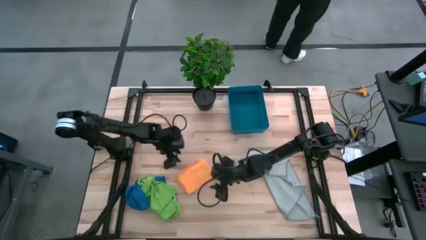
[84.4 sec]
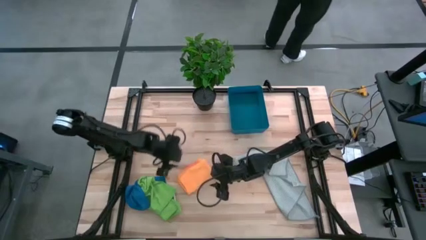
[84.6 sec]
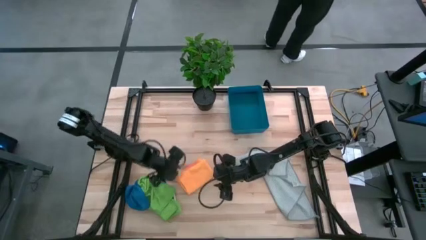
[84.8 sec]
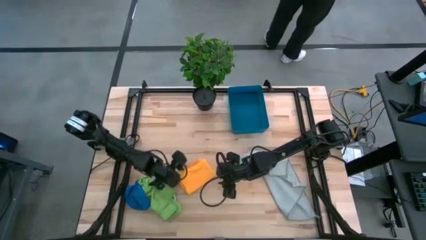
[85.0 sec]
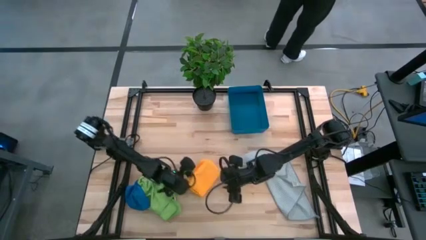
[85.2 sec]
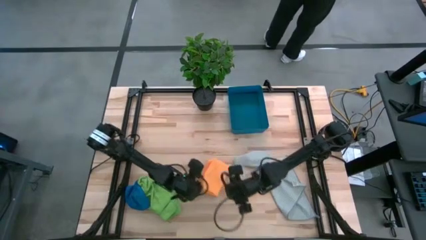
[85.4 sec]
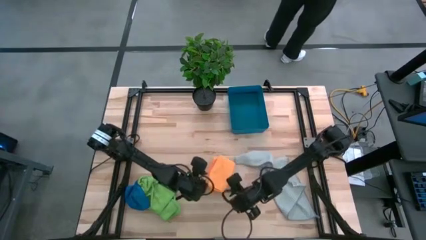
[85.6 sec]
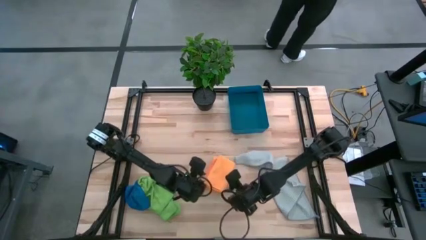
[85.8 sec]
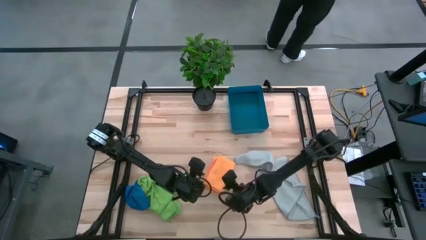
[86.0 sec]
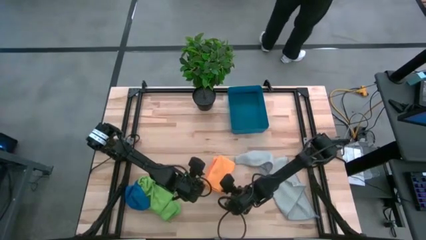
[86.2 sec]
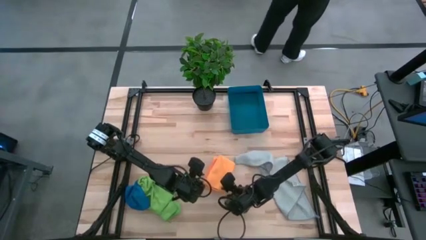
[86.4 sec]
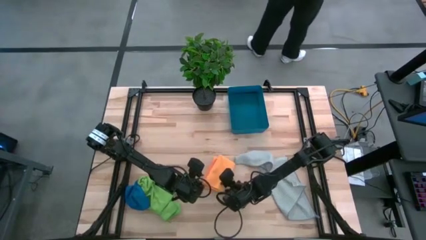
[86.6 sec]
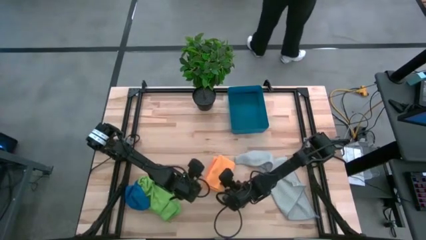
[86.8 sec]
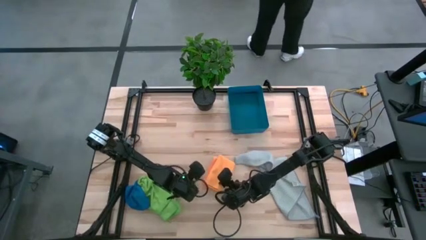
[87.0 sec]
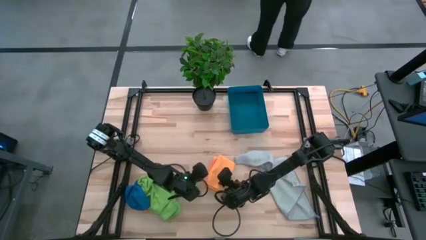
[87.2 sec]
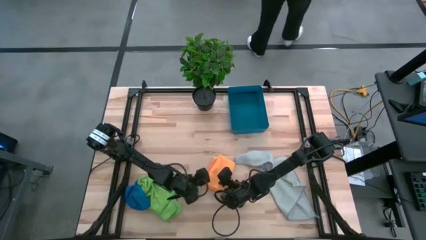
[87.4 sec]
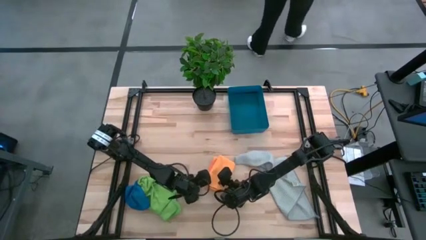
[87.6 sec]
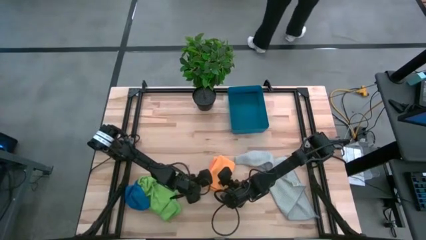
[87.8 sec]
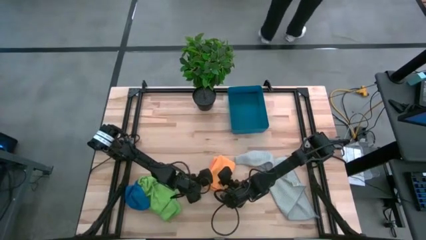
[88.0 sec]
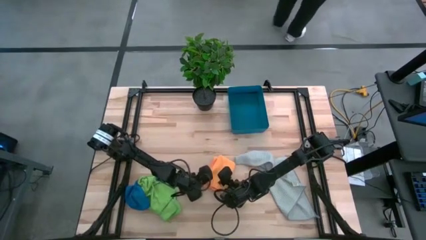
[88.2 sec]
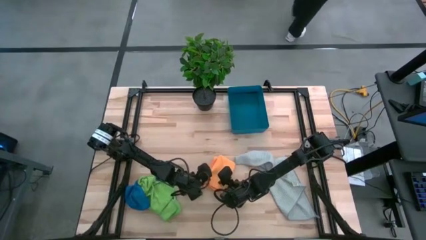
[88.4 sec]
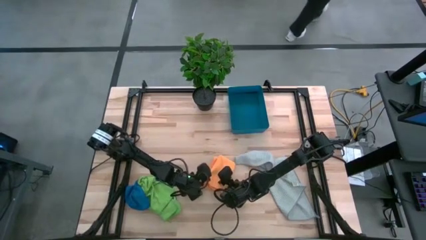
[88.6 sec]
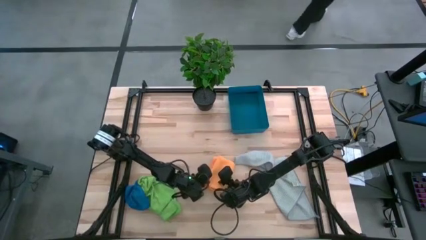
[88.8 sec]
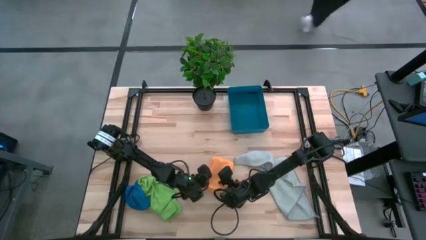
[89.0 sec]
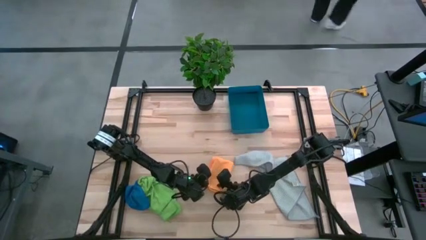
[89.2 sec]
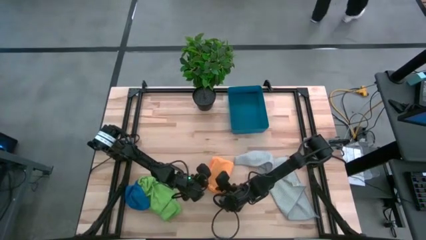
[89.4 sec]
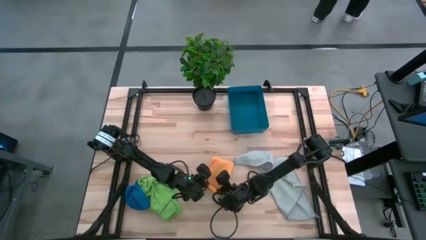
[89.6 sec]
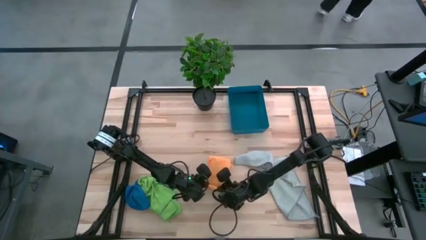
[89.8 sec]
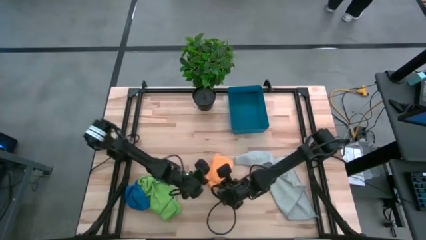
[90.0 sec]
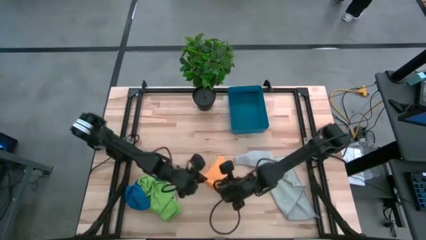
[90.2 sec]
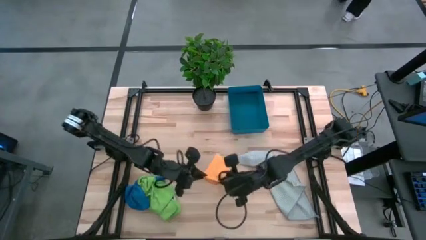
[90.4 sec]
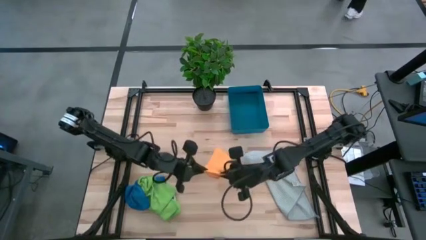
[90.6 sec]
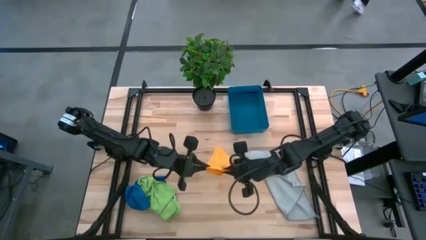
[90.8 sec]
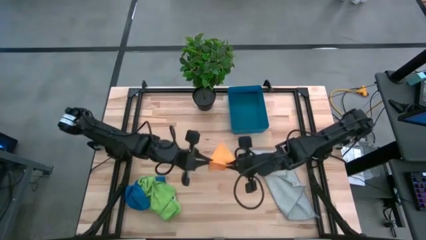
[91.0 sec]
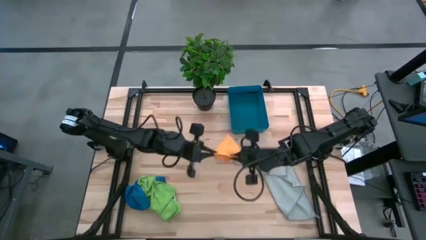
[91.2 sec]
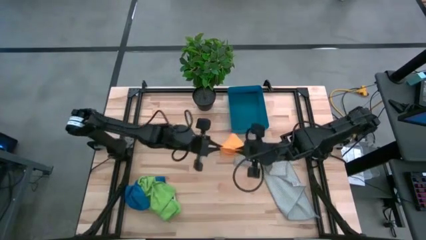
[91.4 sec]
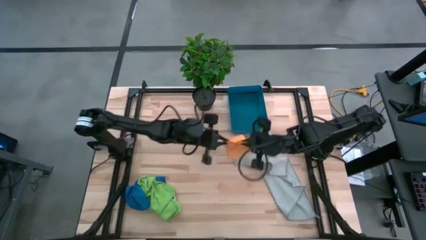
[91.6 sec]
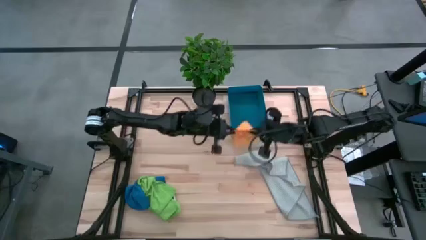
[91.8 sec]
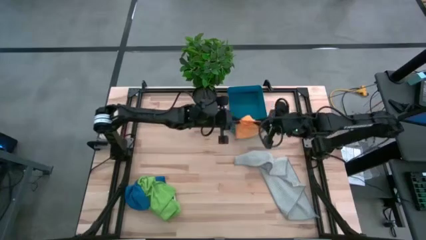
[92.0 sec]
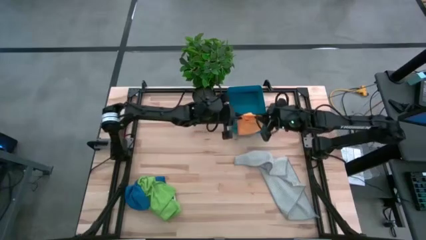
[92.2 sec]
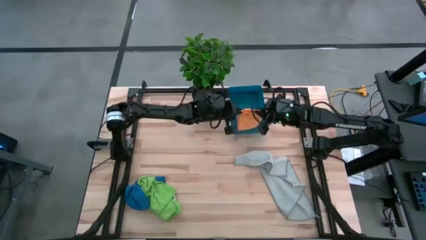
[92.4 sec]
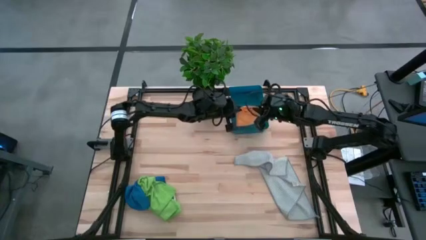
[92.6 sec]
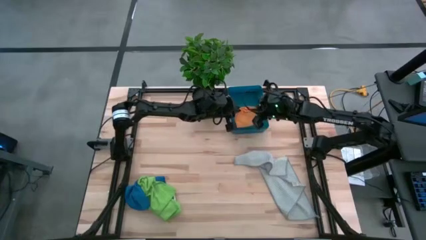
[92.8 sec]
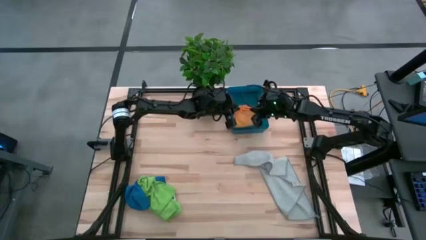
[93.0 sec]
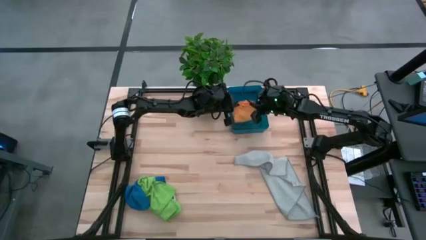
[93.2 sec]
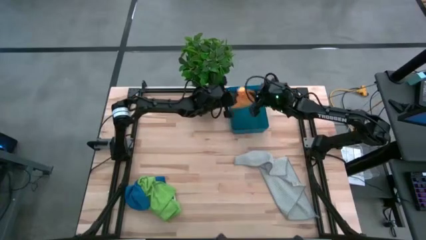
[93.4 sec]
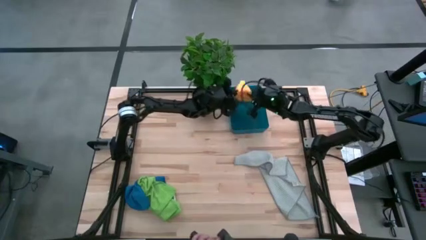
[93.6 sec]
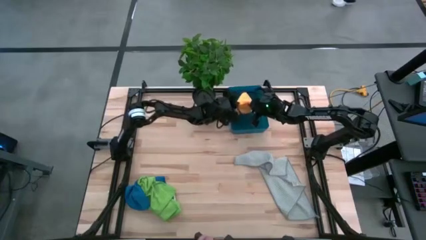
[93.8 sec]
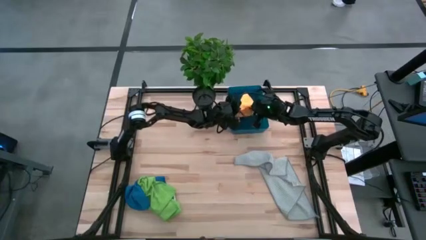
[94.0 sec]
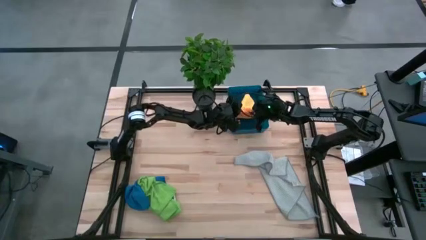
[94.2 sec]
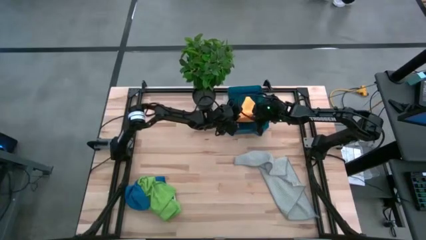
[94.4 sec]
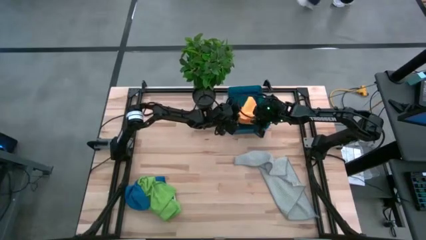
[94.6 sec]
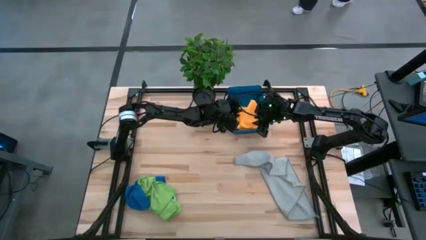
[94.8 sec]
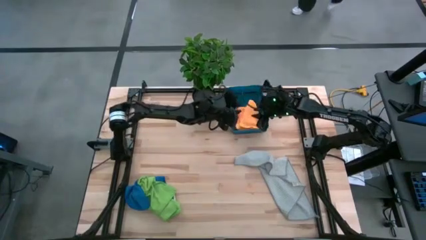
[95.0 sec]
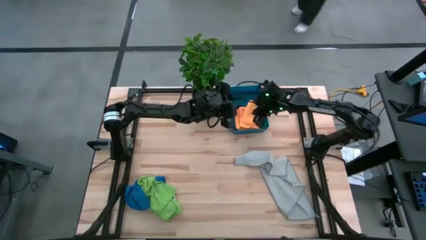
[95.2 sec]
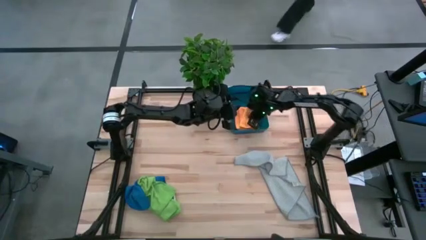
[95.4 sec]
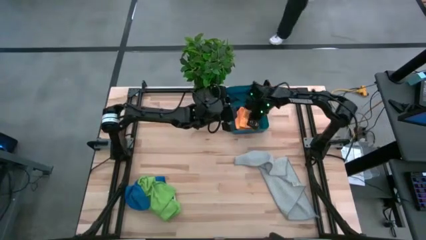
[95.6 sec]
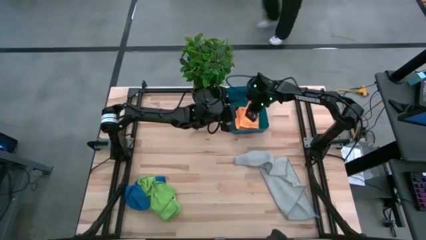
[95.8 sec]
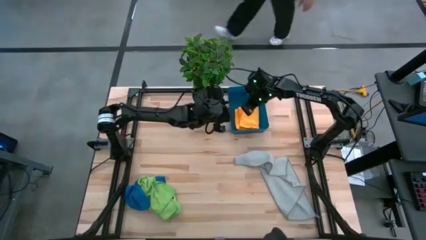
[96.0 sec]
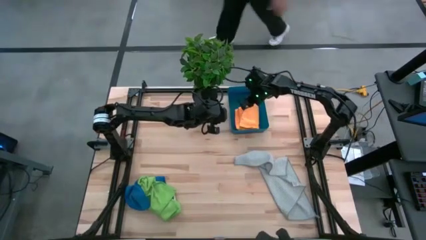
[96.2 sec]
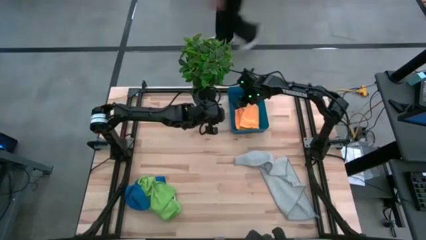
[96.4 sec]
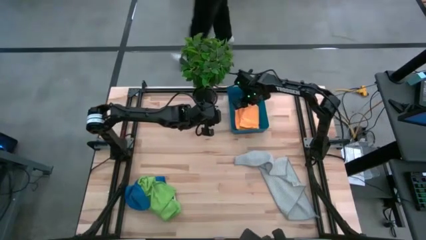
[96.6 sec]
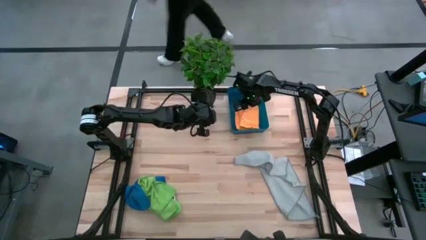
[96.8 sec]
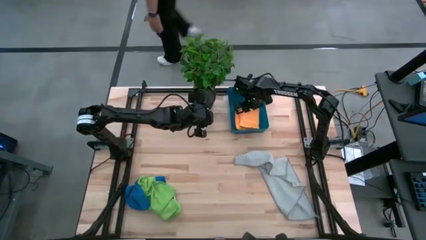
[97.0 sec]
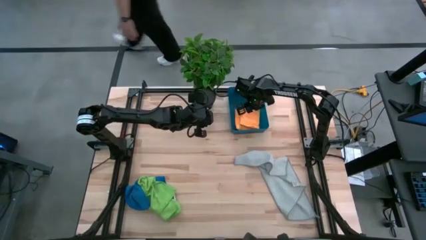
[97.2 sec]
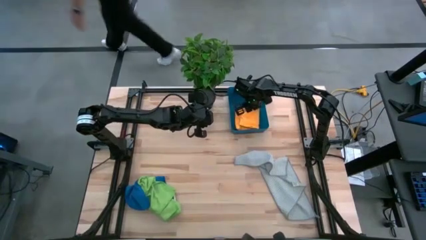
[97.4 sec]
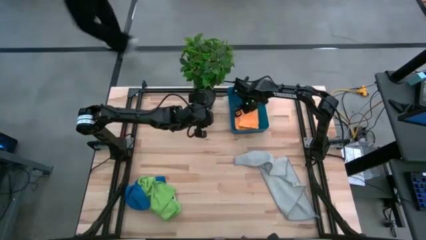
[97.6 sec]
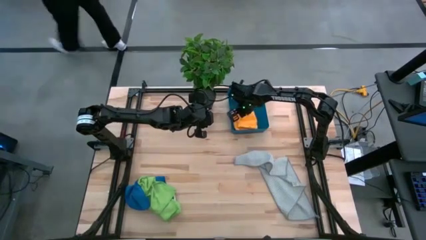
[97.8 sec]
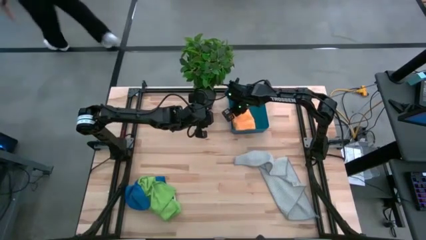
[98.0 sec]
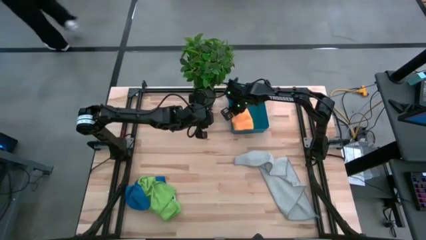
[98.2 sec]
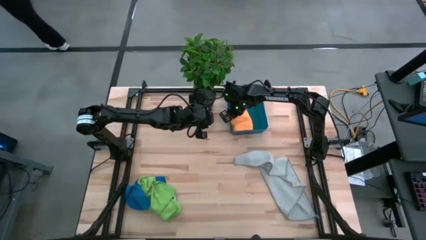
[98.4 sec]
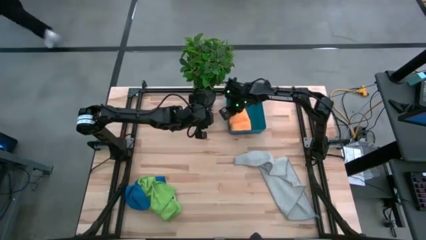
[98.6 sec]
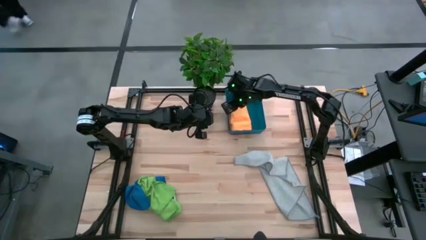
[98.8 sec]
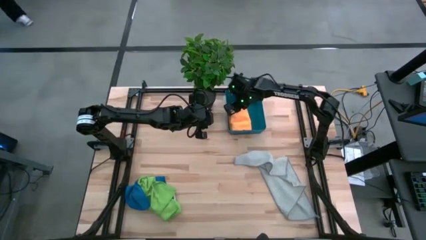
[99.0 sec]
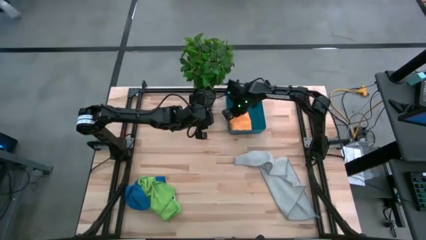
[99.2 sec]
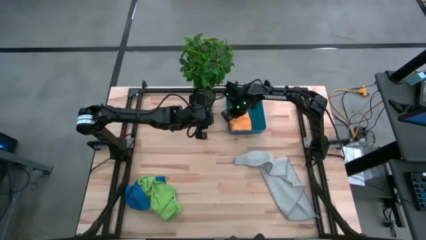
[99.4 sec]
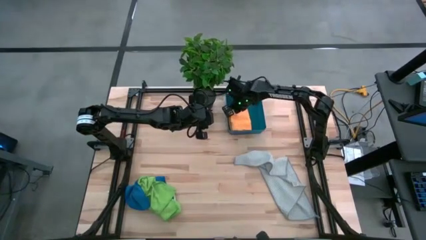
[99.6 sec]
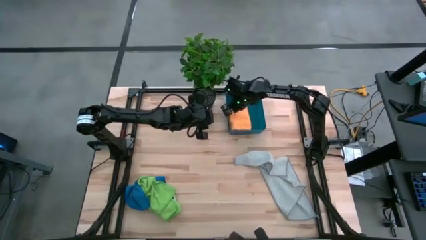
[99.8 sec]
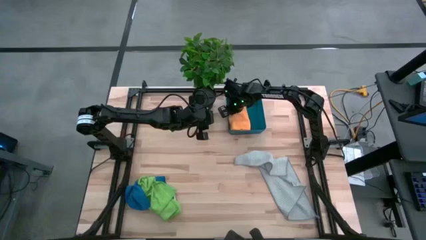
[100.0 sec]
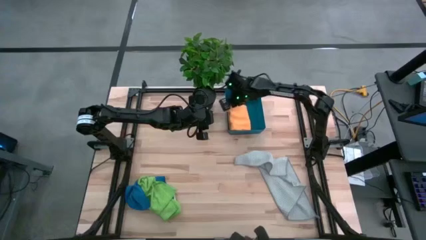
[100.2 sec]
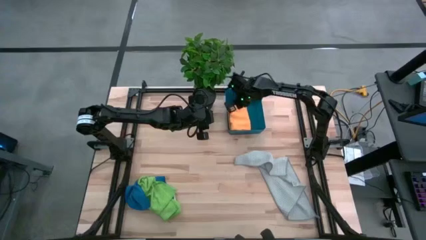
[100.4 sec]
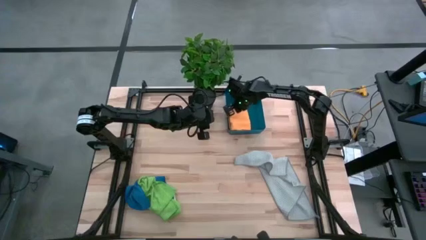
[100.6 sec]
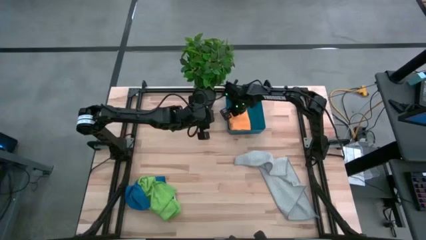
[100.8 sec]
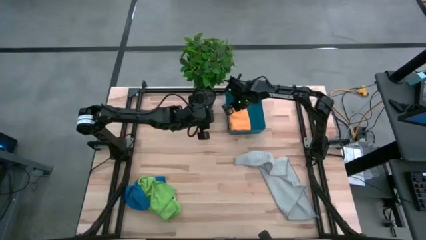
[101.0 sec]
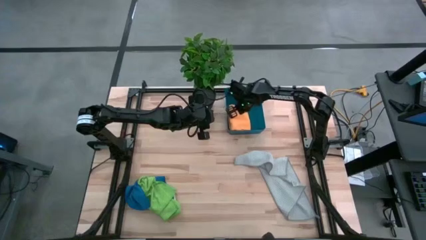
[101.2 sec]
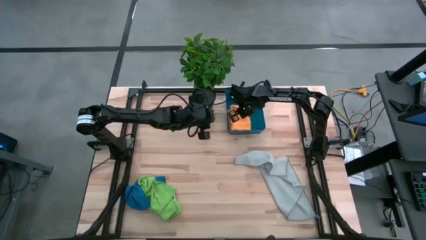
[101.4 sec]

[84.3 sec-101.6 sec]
Task: Fold microfiber towels
Put the orange microfiber towel into the blue bin
